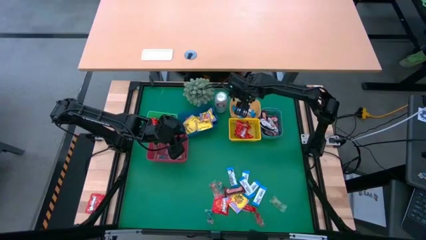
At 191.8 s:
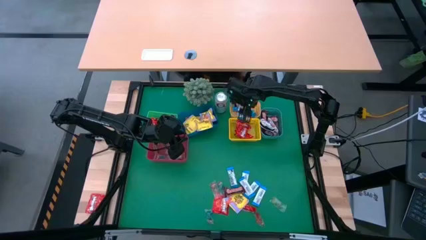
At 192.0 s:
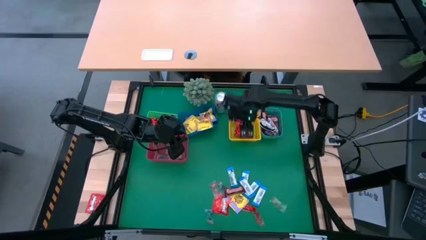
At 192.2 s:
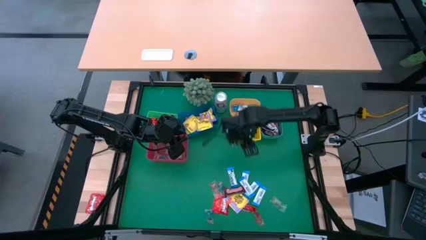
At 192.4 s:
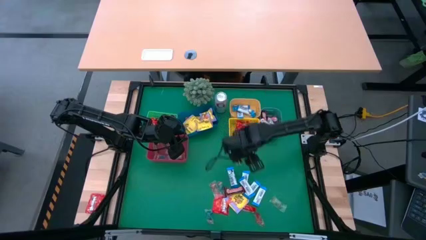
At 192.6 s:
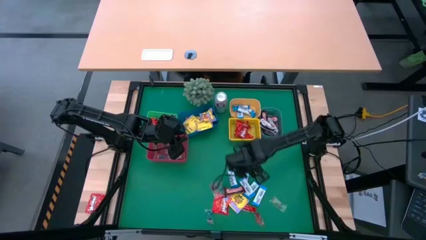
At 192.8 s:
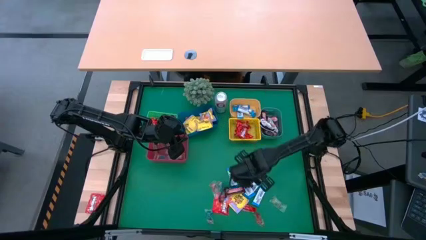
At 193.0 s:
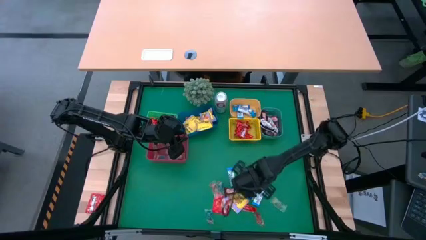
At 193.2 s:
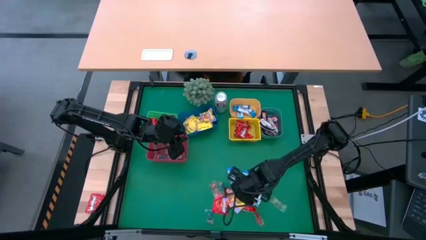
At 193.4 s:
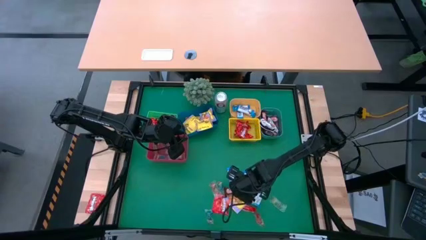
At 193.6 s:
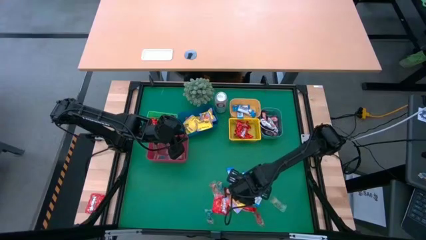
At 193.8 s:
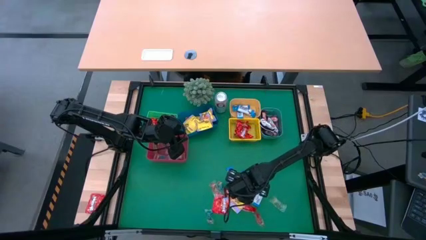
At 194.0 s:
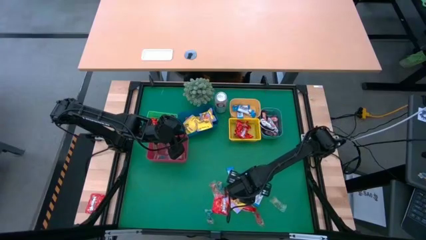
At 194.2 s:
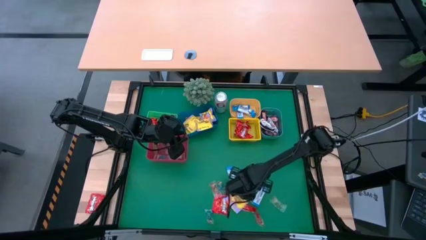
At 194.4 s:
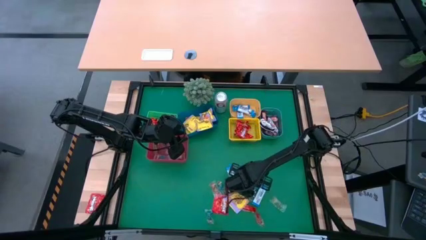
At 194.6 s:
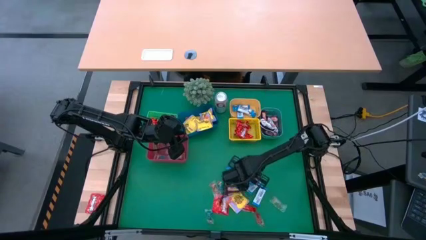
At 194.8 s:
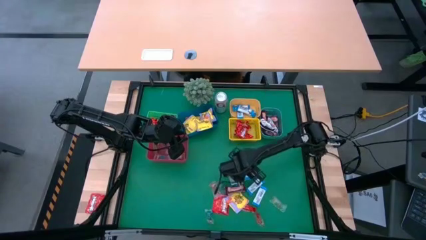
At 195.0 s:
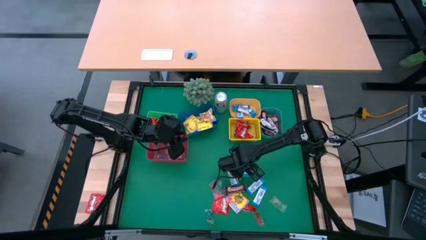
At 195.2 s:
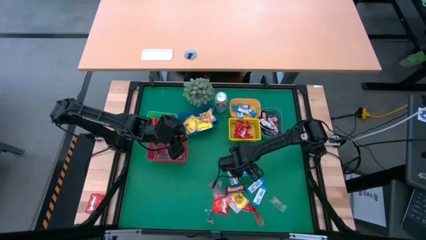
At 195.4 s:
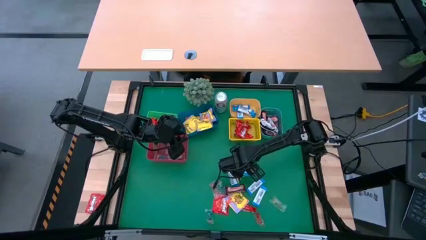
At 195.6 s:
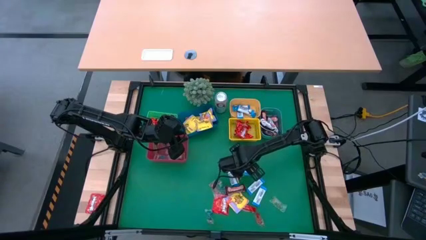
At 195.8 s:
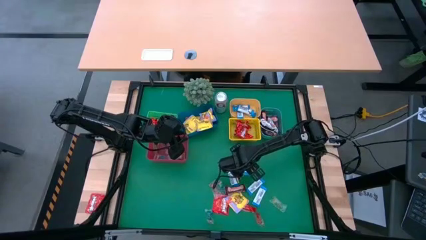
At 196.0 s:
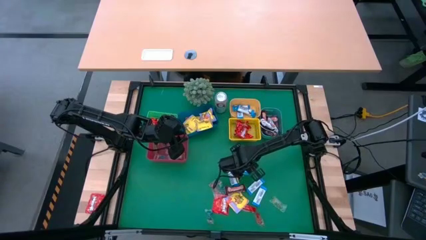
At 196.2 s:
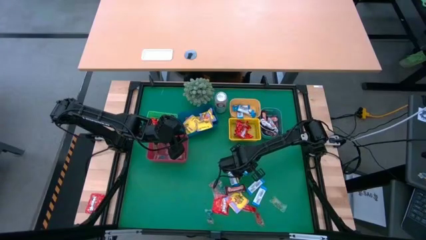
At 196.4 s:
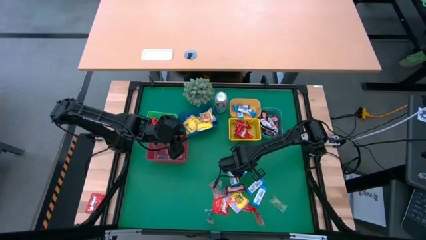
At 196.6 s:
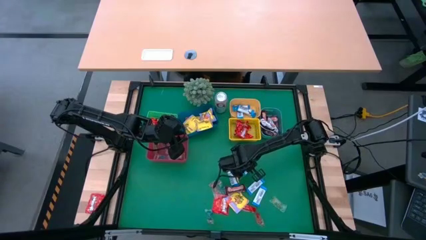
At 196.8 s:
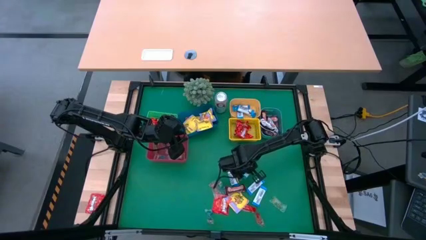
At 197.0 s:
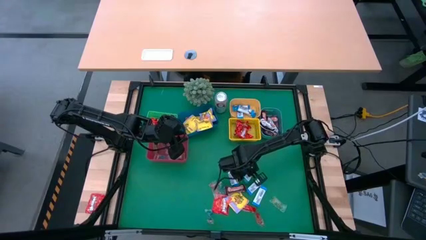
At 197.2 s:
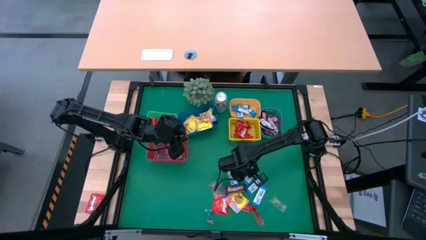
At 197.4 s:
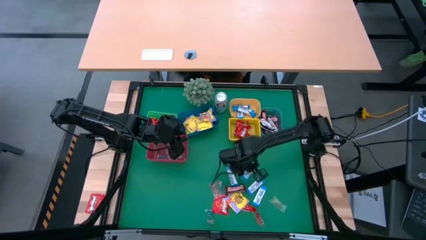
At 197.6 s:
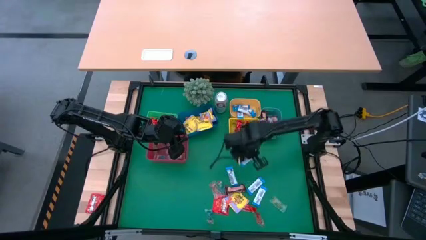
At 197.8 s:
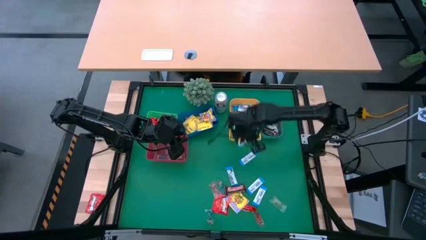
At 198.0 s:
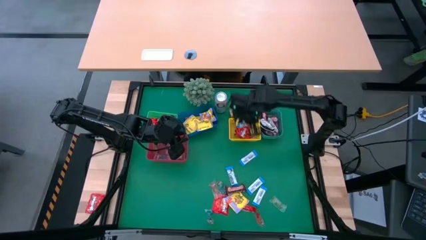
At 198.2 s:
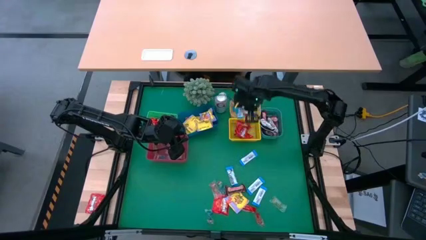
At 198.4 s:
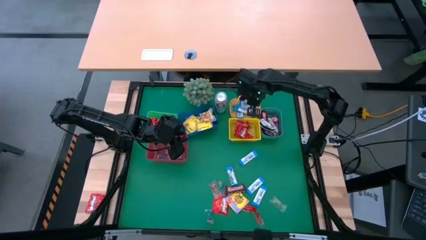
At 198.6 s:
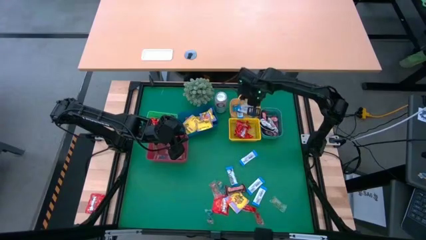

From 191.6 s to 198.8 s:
Task: Sort candy
Put the blue chocolate bar into the orange bin

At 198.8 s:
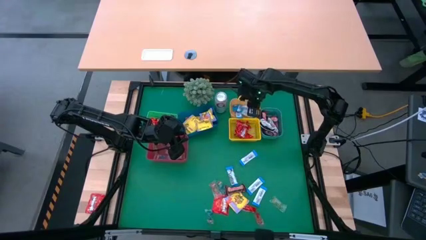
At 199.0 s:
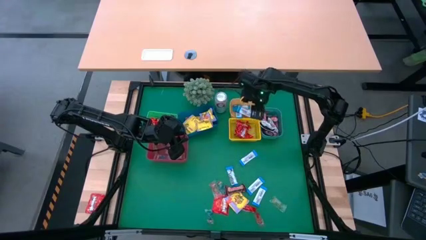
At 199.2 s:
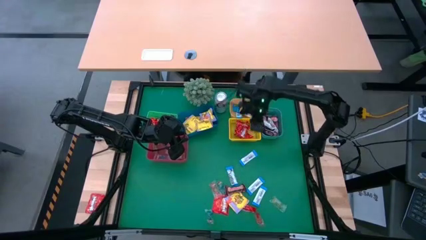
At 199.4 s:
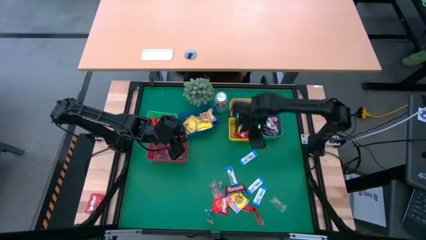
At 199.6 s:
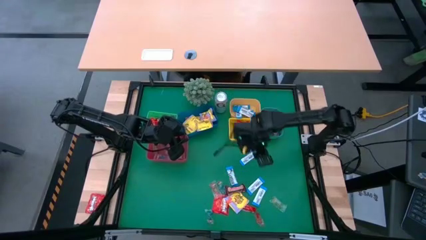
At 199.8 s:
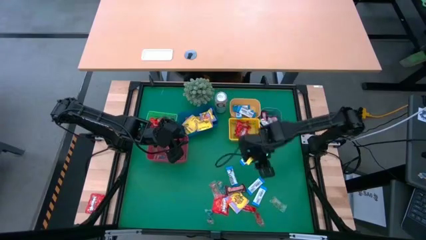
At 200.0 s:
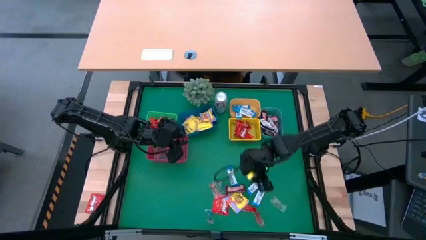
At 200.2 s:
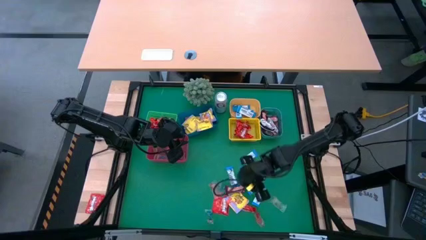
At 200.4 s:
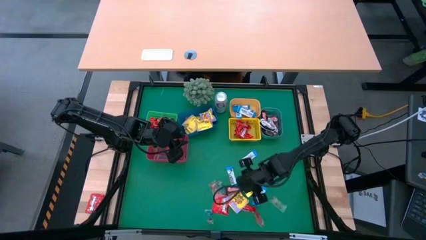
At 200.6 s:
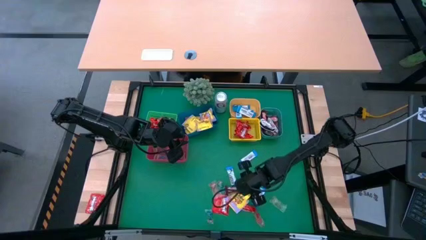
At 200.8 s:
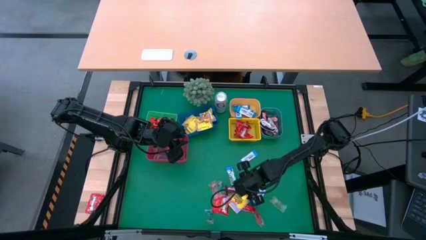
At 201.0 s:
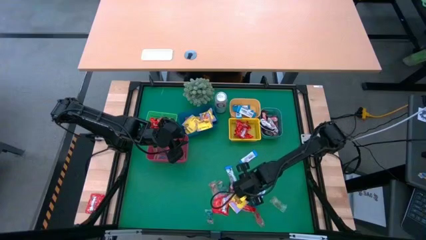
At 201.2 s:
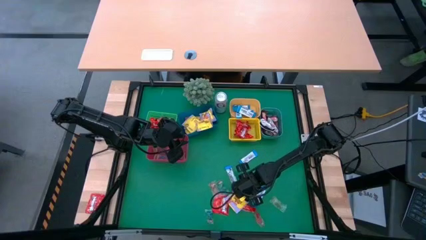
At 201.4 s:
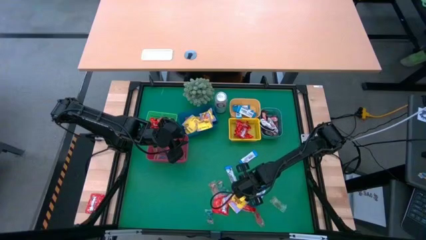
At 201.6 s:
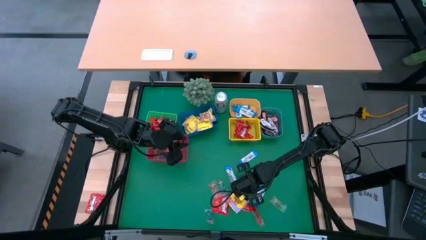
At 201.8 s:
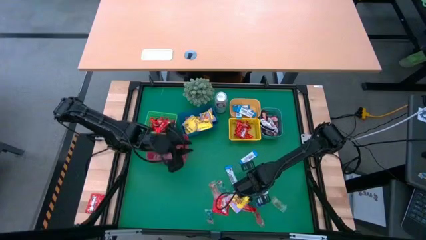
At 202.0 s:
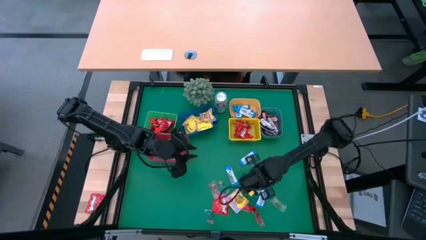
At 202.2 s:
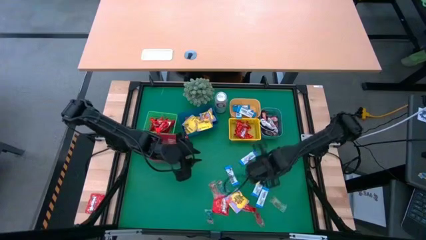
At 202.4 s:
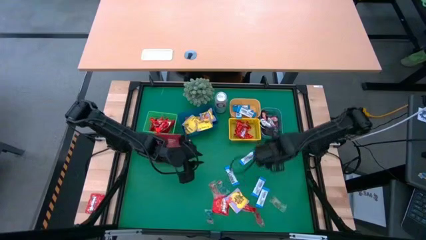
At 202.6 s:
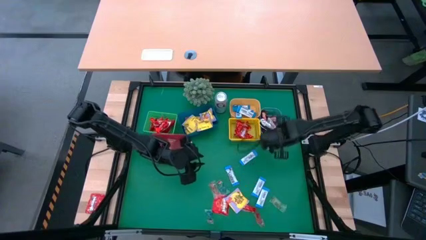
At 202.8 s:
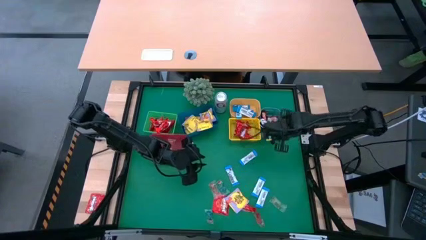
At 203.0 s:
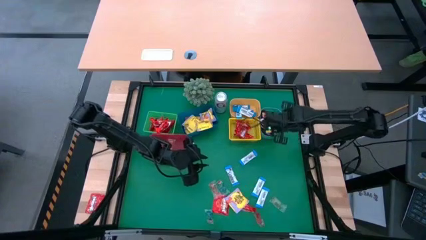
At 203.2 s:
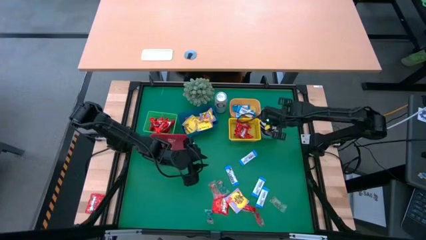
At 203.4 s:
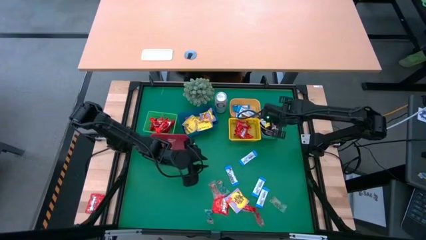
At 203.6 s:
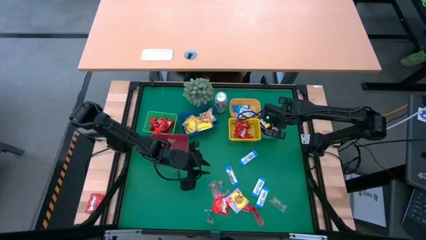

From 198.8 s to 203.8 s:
Put the brown candy bar into the green bin

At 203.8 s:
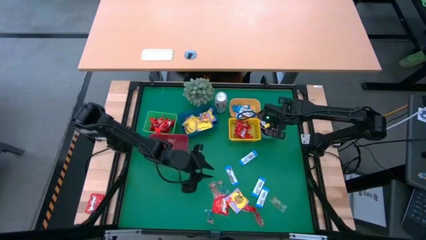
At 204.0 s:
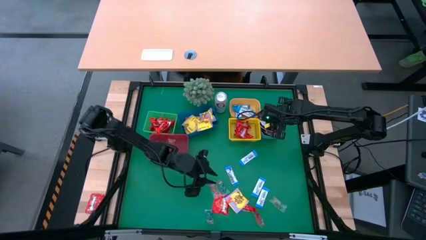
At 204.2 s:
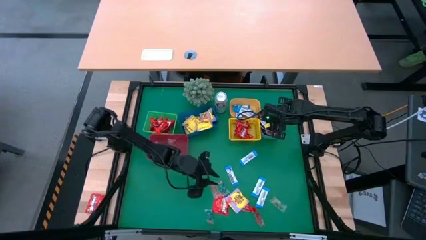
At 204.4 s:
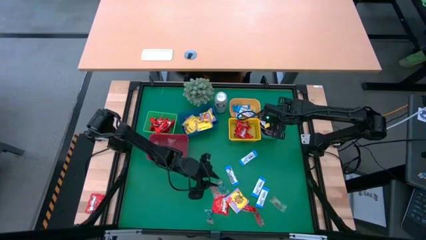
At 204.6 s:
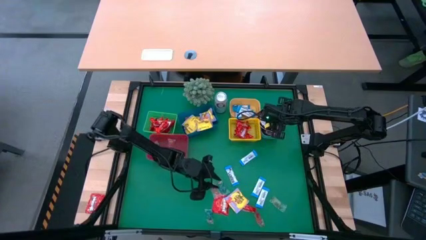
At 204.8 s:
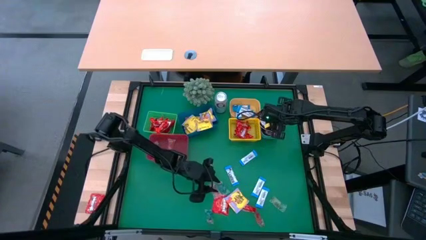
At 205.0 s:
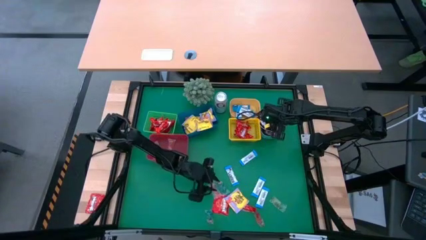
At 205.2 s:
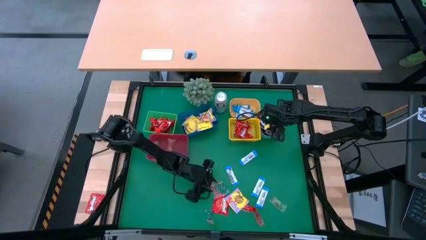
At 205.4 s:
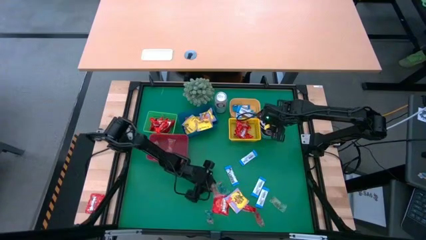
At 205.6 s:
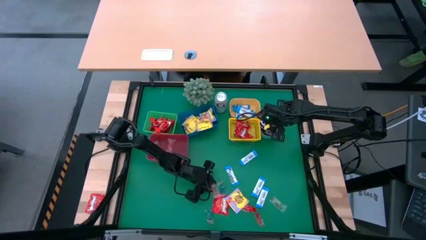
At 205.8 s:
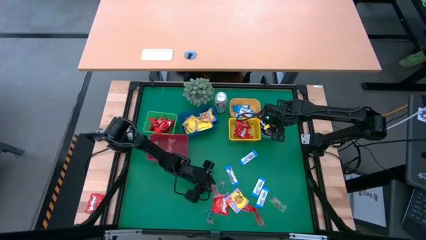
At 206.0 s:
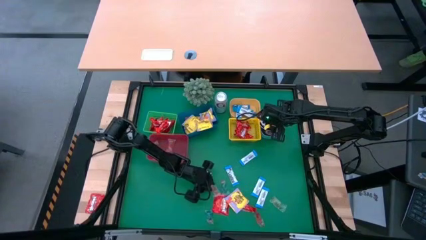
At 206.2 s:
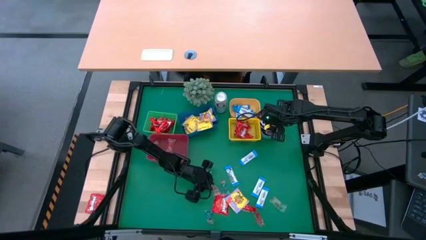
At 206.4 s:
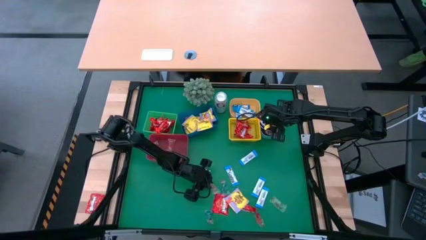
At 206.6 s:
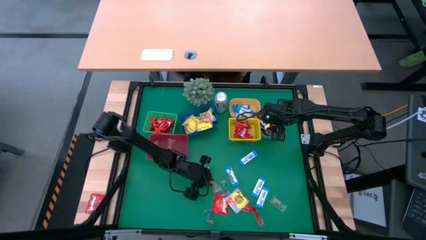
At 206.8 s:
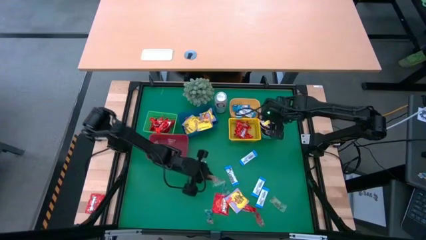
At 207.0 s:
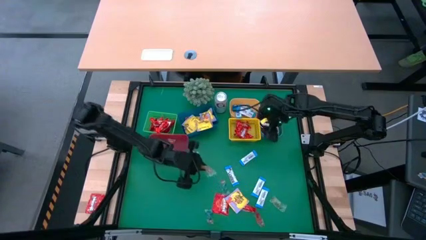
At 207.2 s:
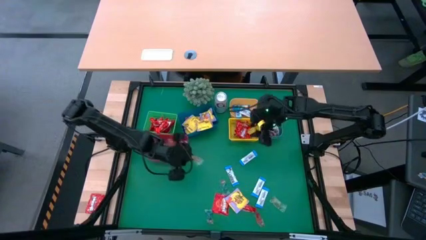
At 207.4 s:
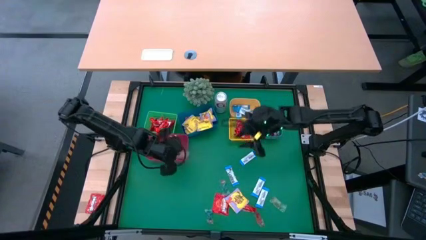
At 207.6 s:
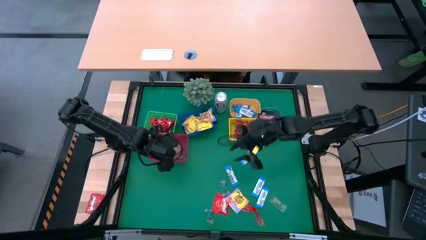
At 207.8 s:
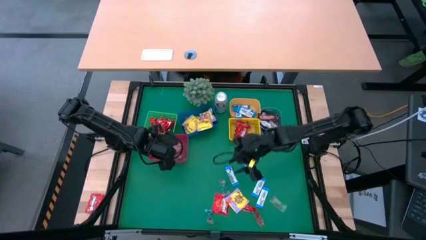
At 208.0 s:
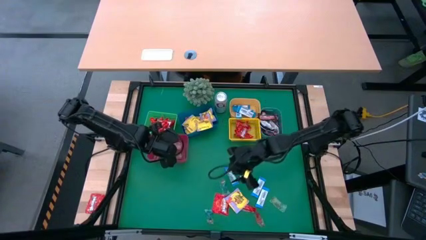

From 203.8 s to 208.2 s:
Put the transparent orange candy pack into the red bin
